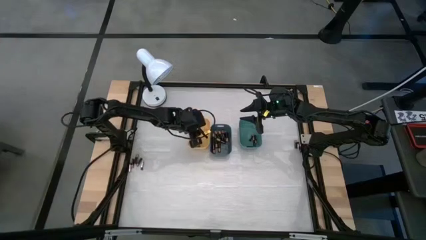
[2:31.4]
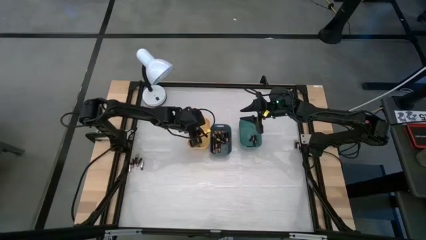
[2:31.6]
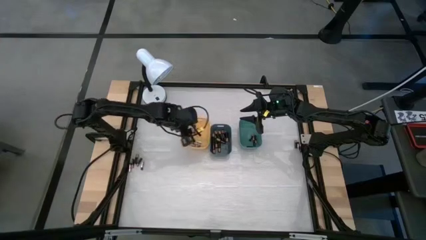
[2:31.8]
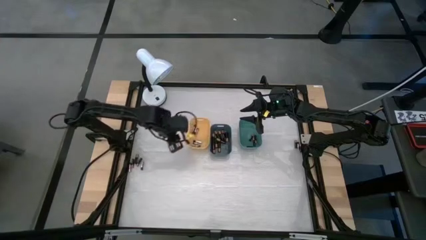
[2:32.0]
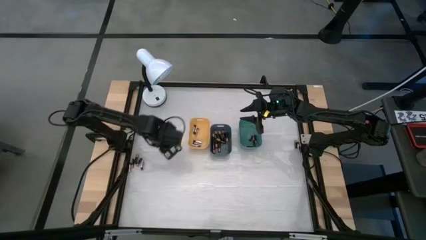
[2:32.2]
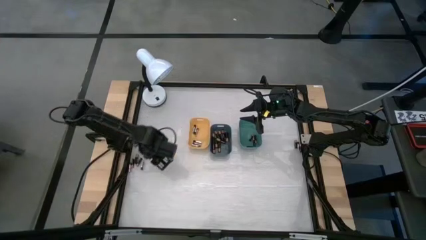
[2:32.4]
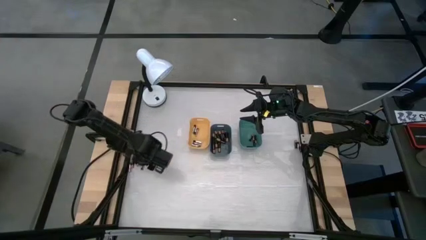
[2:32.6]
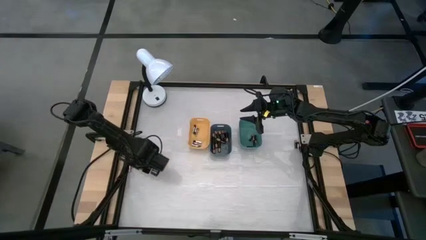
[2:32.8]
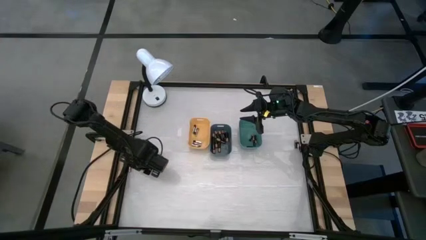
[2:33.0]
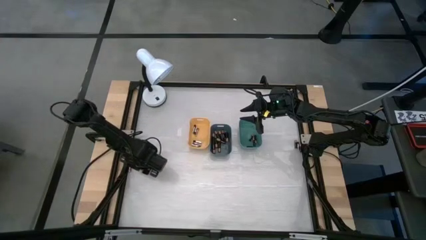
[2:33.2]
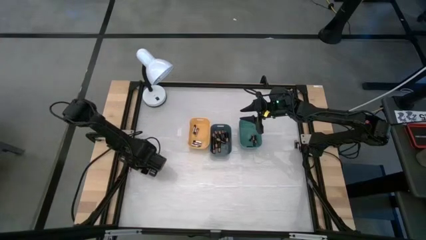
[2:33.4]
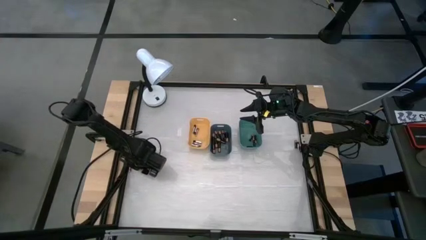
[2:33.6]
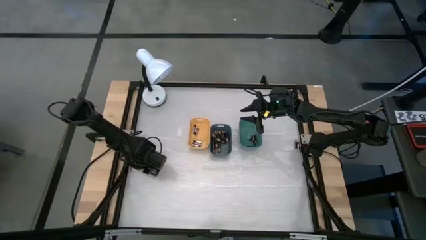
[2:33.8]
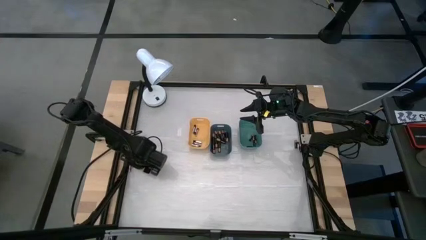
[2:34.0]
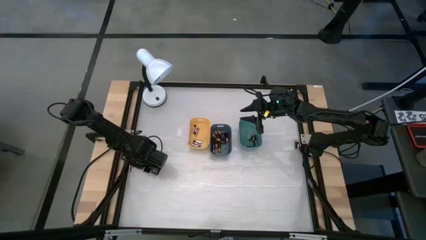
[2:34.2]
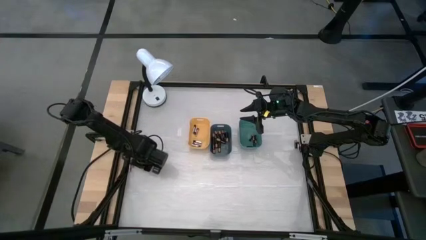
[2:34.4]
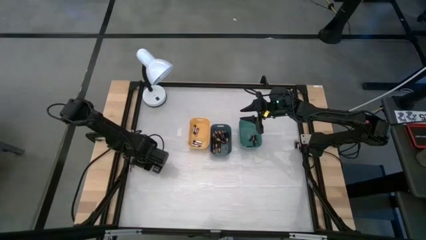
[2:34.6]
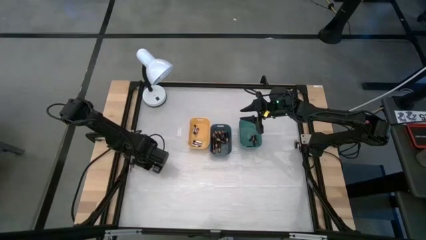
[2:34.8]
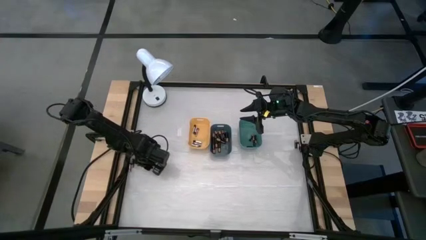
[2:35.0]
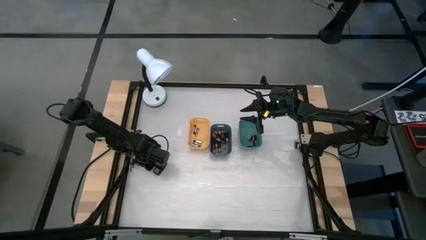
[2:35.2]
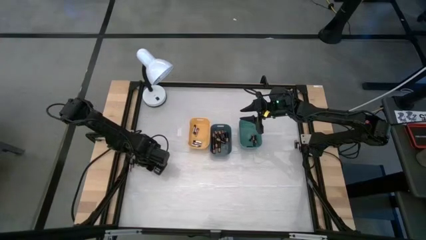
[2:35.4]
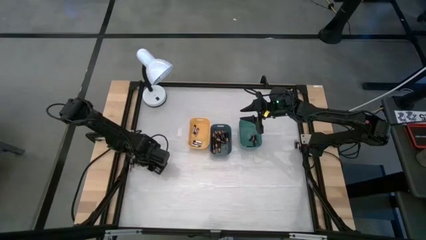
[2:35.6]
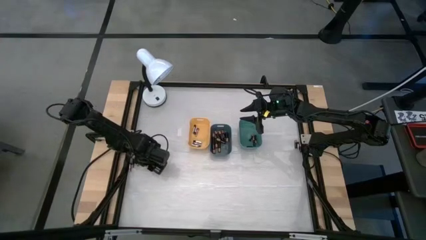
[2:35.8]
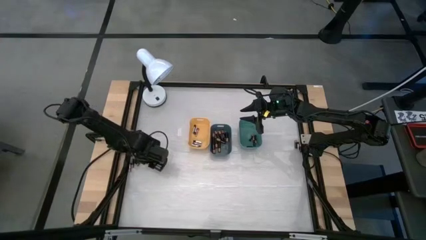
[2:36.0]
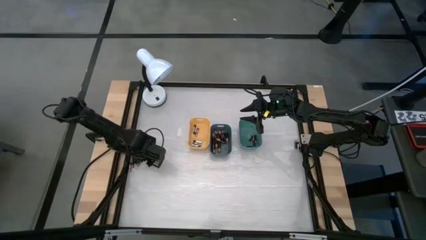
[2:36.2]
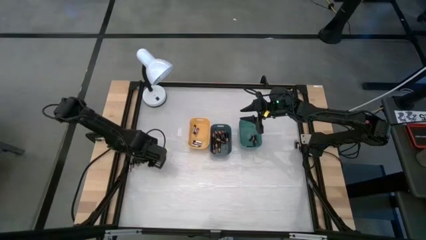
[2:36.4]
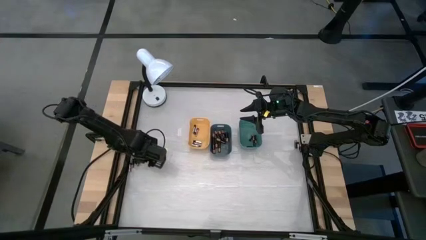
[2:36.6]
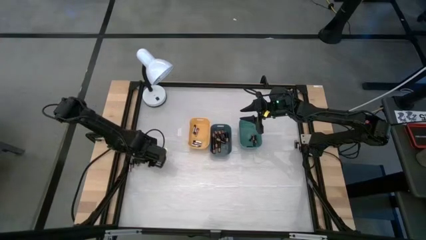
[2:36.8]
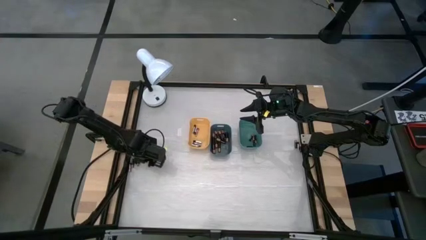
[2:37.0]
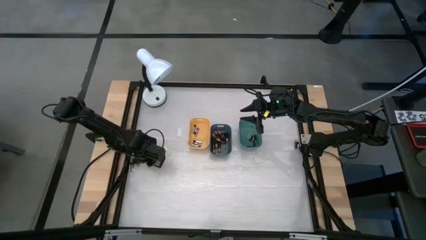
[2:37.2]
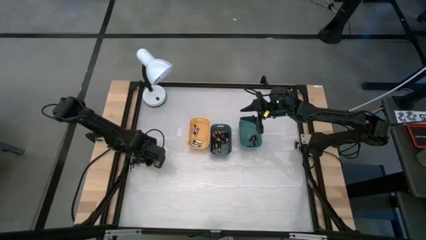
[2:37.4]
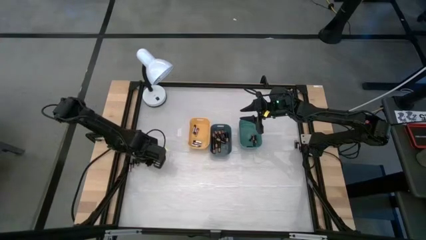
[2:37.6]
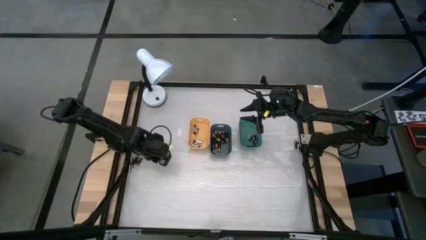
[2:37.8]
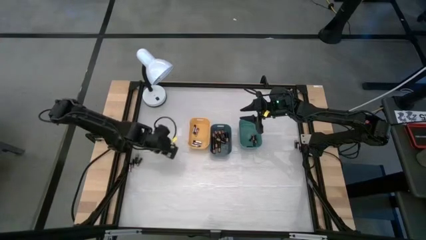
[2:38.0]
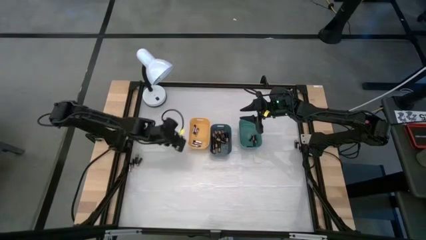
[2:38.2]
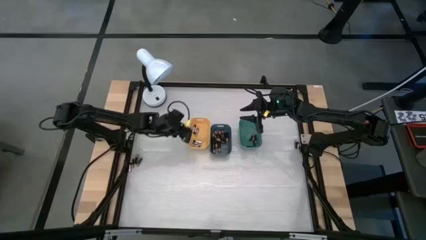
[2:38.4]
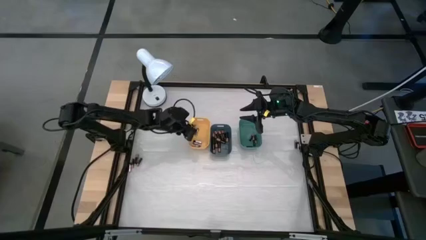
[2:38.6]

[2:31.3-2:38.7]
Task: Sort batteries
Put the silver battery into the yellow bin

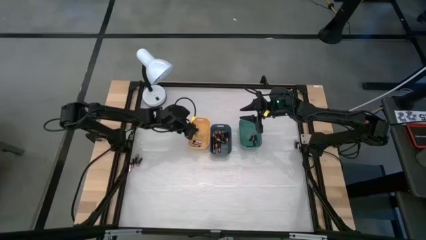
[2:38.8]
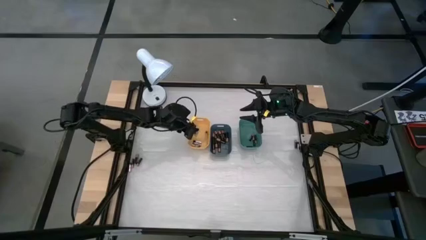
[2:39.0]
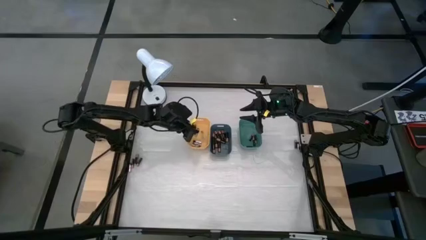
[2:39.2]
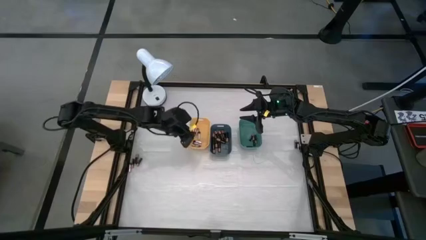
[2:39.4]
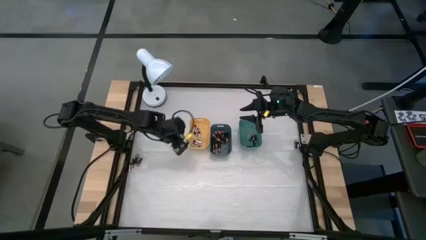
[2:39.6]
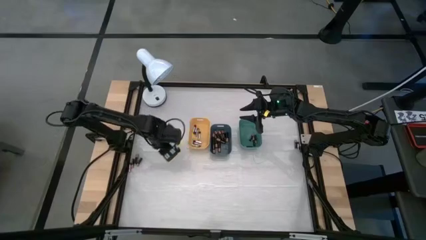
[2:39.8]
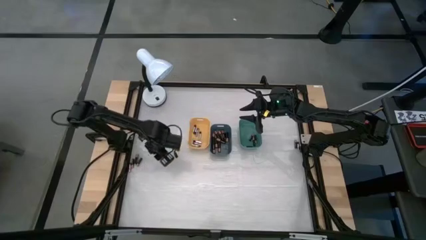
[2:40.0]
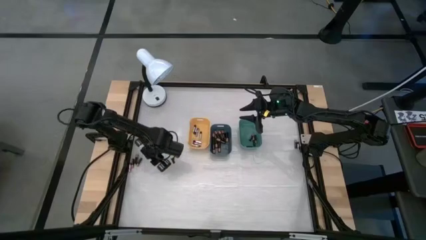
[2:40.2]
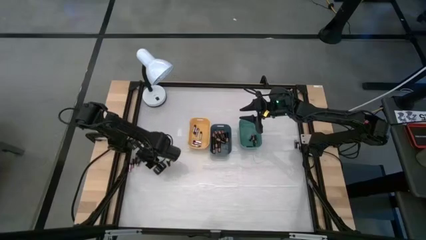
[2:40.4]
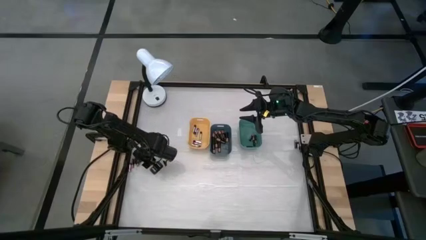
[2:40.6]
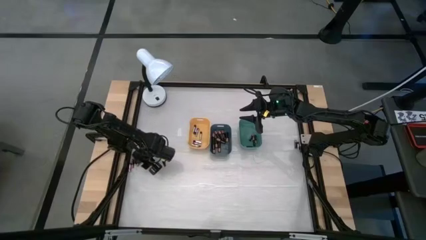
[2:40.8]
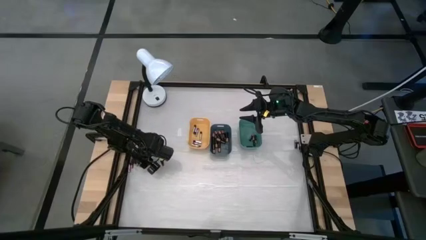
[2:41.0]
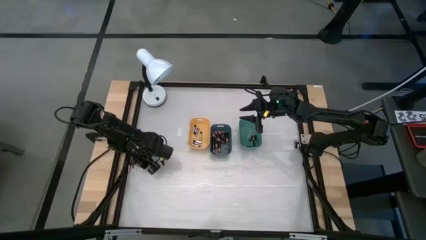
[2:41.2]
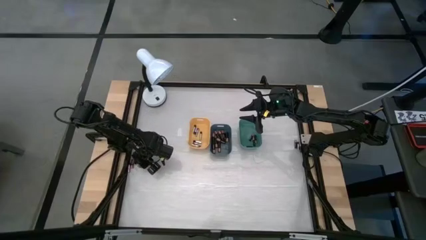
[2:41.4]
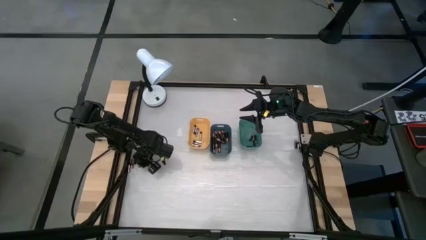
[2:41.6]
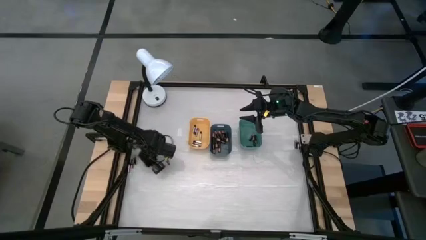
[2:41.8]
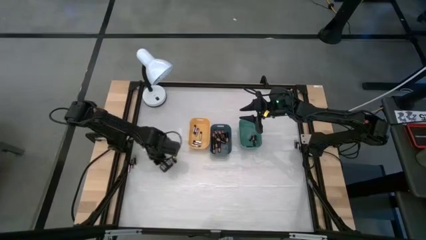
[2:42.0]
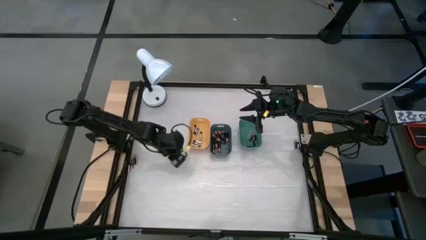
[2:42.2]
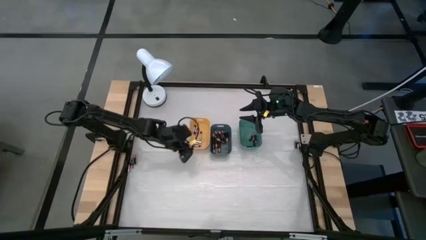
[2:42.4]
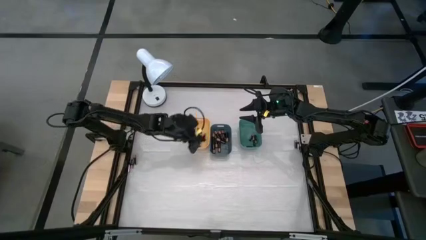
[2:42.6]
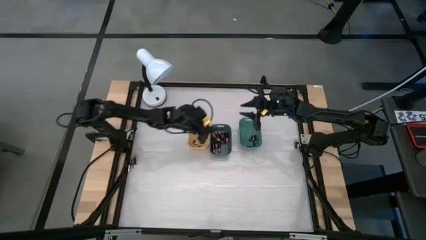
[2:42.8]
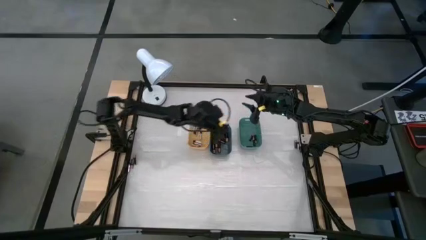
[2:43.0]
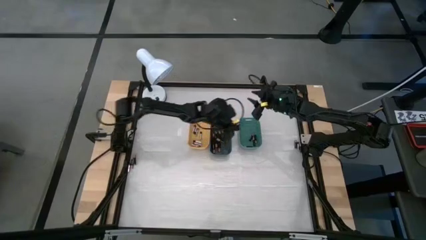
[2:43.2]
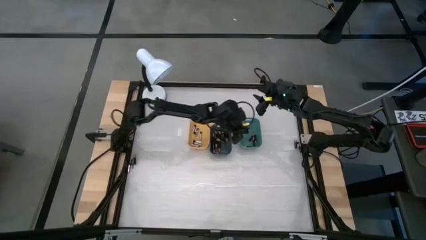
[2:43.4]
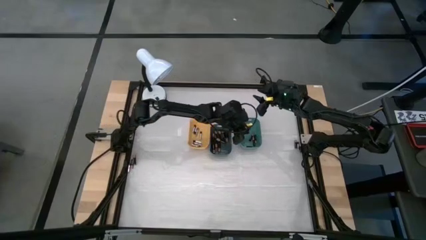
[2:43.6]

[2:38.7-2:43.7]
Put the silver battery into the yellow bin
